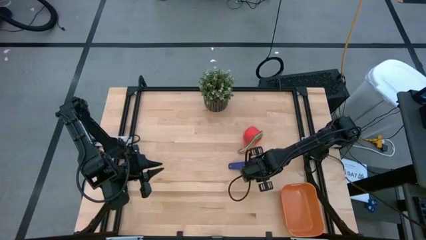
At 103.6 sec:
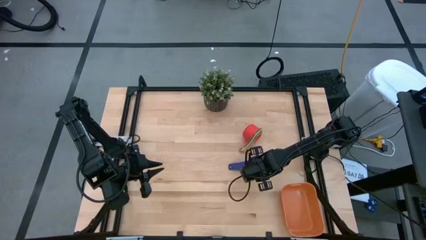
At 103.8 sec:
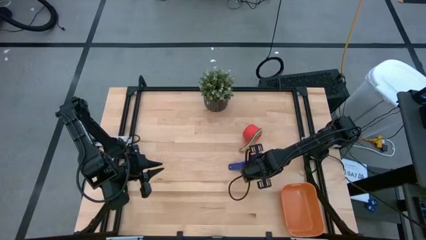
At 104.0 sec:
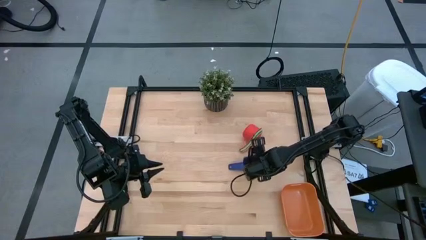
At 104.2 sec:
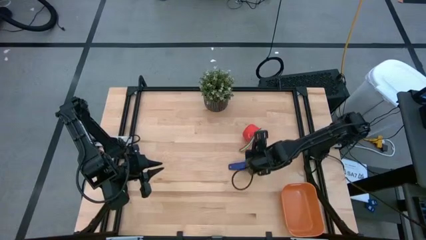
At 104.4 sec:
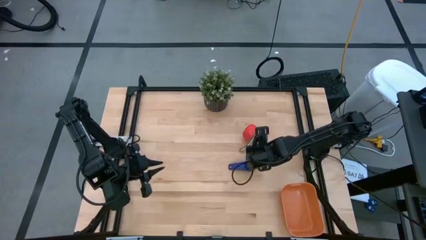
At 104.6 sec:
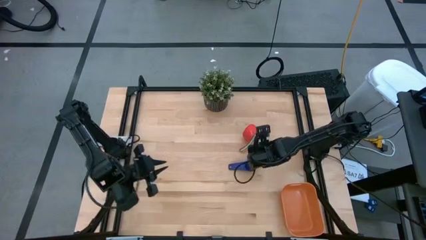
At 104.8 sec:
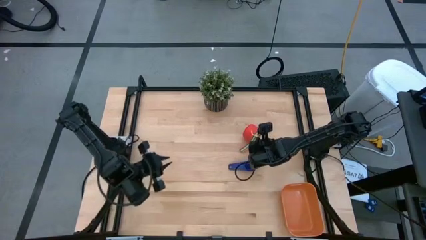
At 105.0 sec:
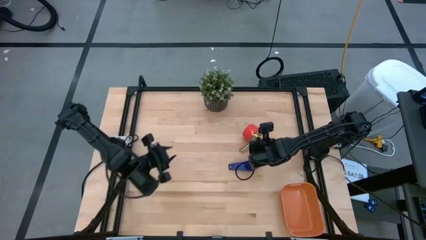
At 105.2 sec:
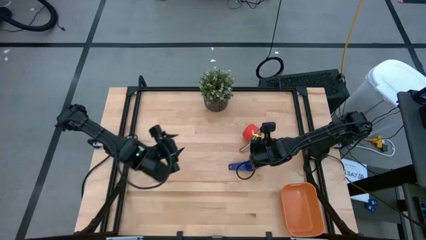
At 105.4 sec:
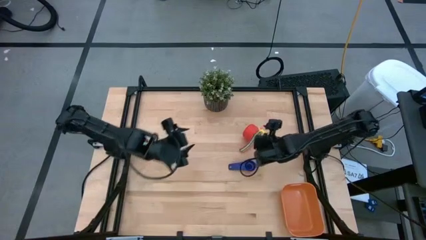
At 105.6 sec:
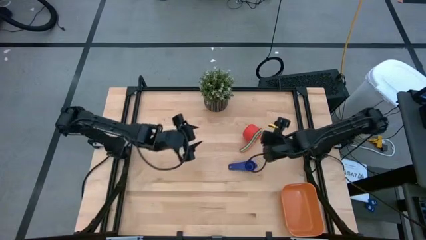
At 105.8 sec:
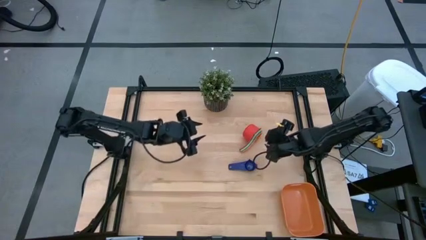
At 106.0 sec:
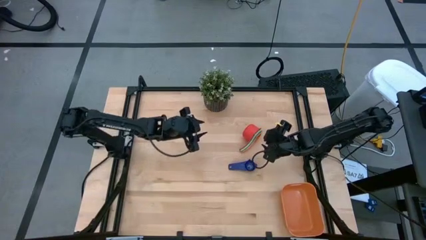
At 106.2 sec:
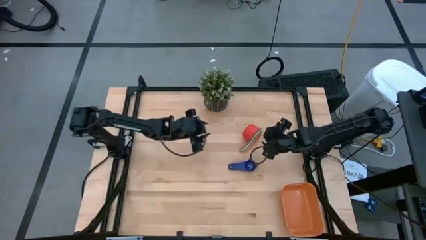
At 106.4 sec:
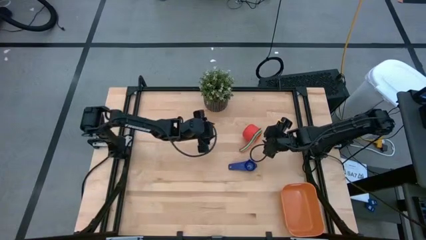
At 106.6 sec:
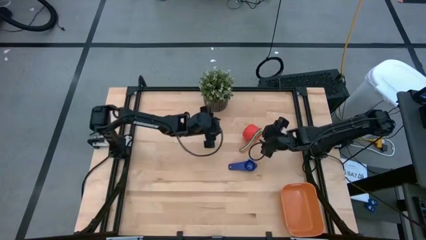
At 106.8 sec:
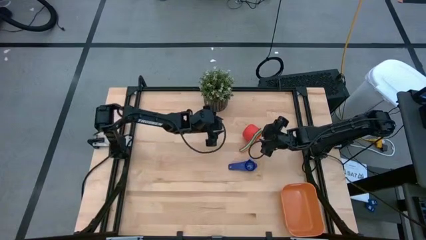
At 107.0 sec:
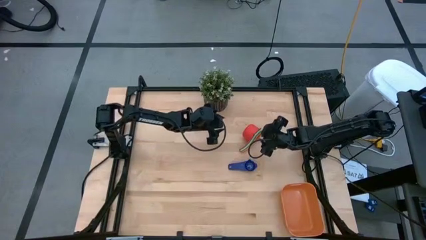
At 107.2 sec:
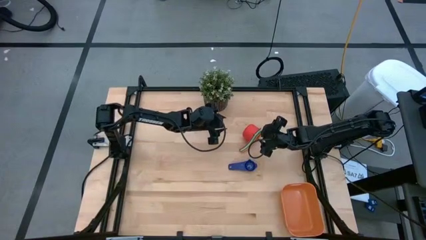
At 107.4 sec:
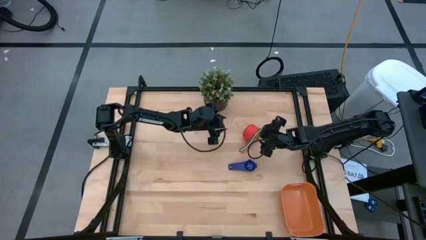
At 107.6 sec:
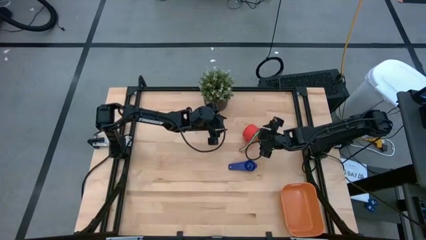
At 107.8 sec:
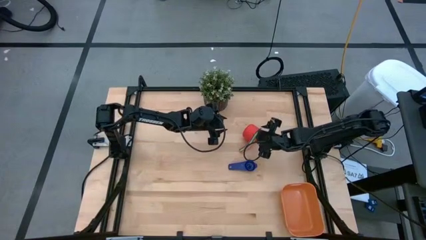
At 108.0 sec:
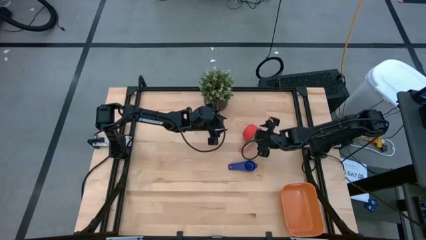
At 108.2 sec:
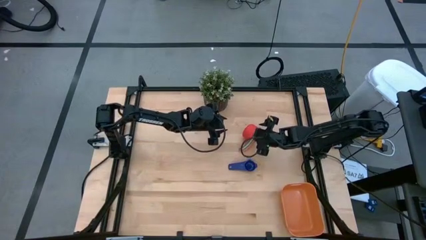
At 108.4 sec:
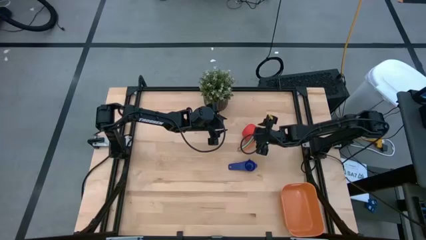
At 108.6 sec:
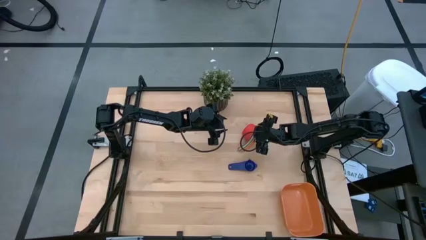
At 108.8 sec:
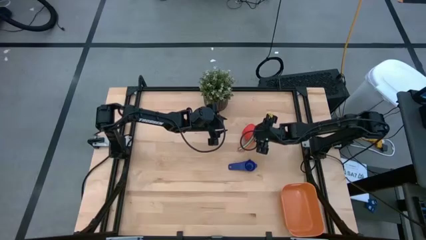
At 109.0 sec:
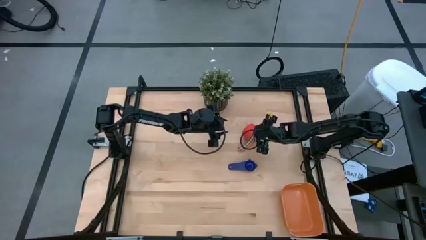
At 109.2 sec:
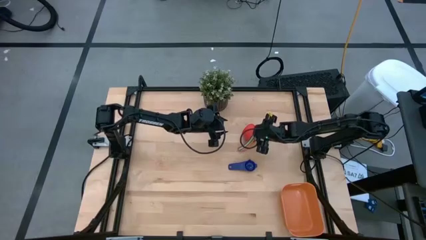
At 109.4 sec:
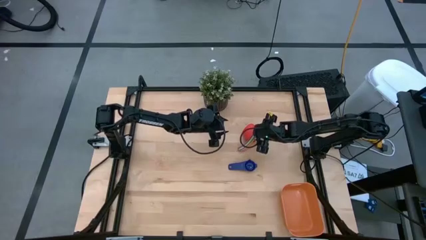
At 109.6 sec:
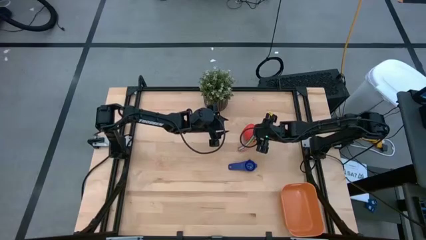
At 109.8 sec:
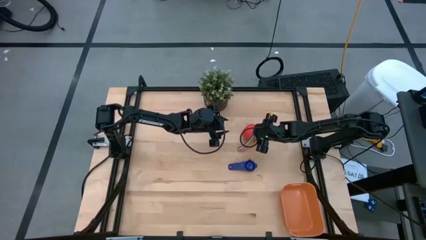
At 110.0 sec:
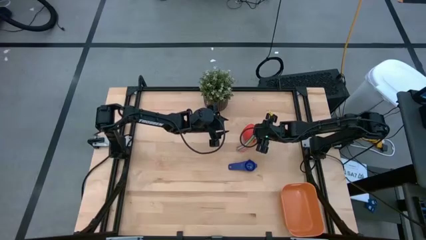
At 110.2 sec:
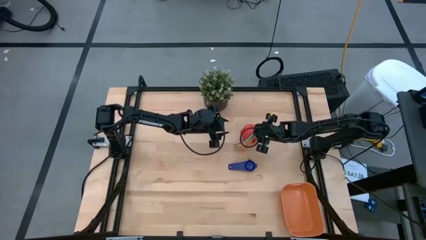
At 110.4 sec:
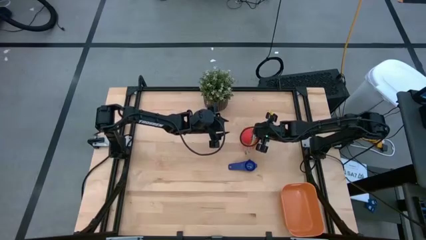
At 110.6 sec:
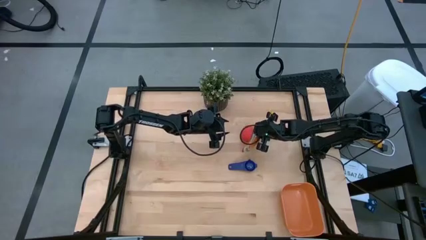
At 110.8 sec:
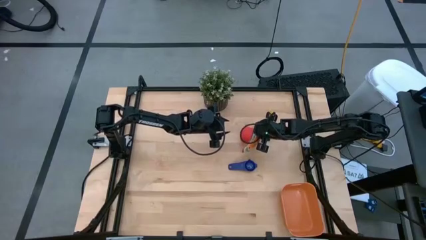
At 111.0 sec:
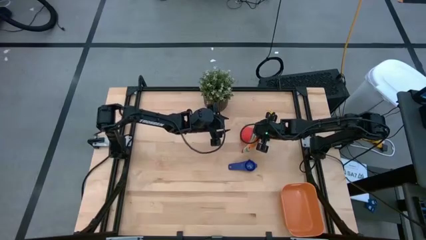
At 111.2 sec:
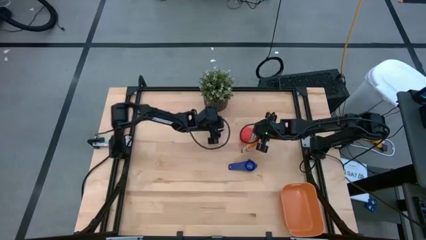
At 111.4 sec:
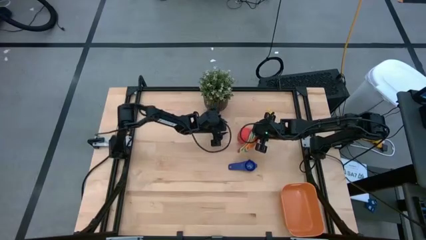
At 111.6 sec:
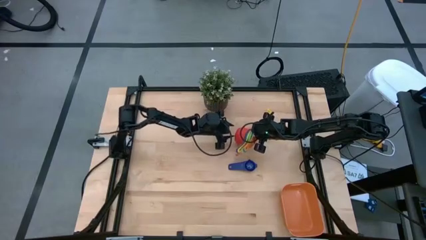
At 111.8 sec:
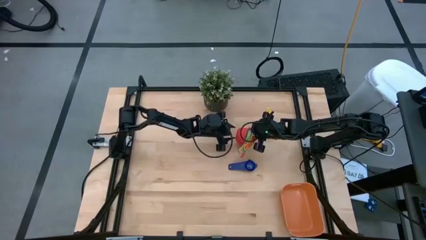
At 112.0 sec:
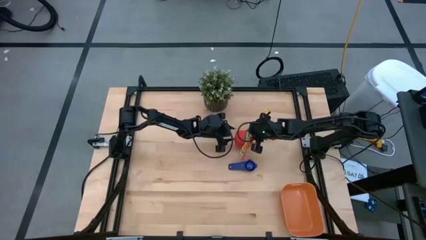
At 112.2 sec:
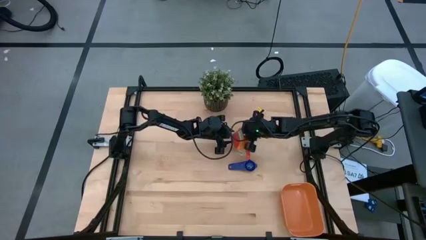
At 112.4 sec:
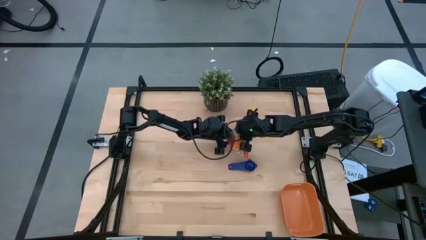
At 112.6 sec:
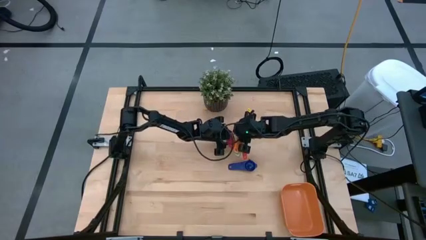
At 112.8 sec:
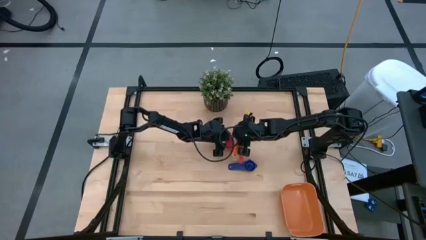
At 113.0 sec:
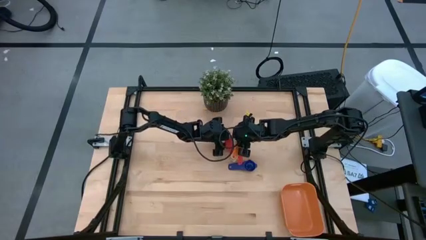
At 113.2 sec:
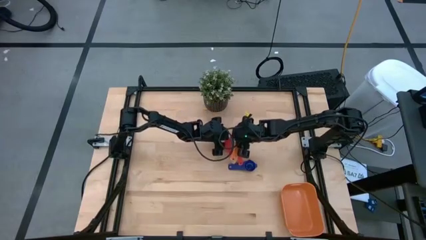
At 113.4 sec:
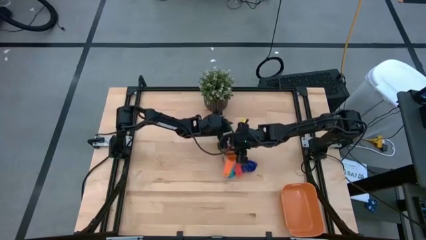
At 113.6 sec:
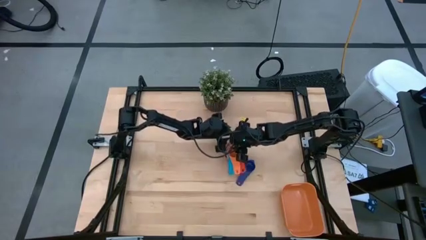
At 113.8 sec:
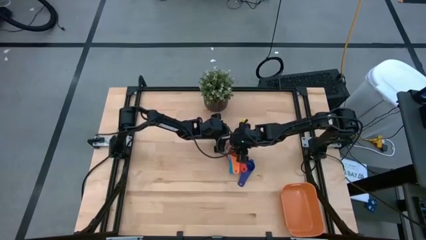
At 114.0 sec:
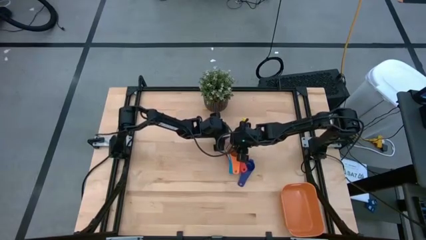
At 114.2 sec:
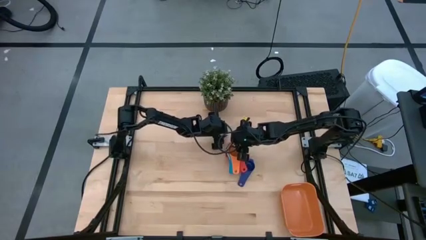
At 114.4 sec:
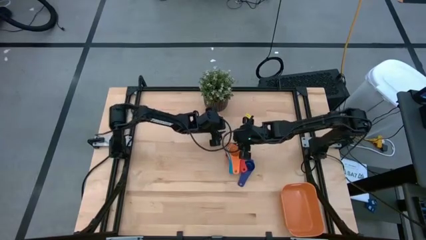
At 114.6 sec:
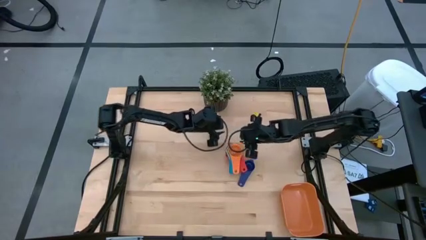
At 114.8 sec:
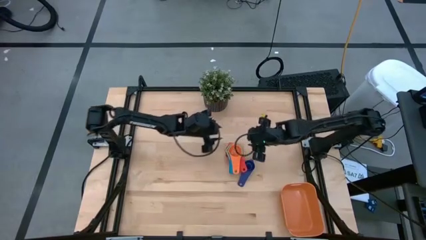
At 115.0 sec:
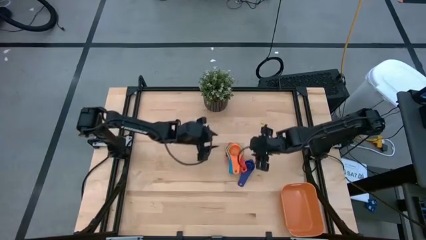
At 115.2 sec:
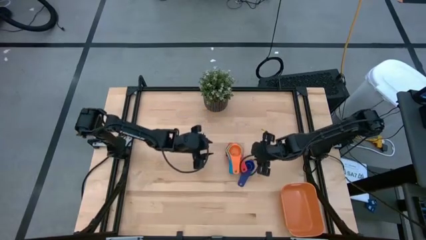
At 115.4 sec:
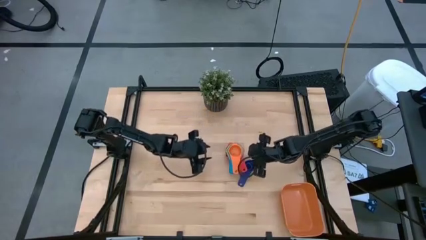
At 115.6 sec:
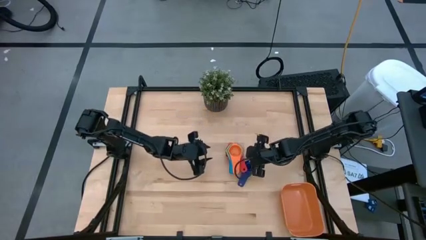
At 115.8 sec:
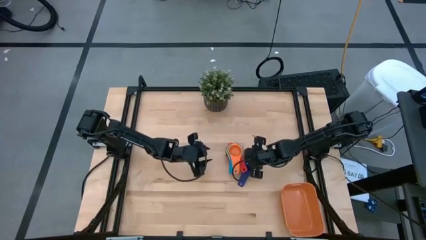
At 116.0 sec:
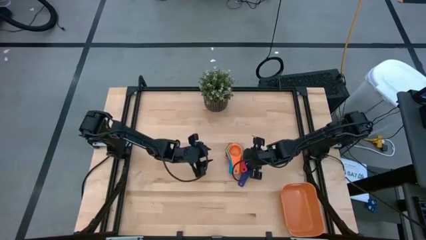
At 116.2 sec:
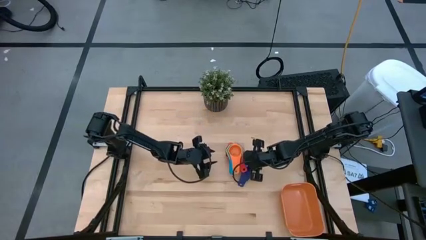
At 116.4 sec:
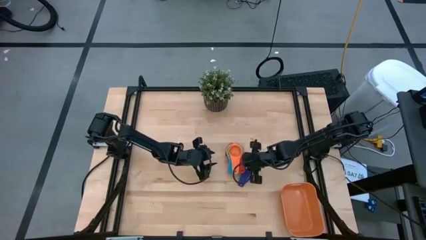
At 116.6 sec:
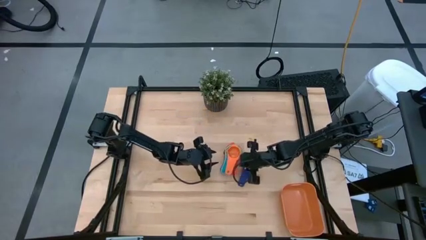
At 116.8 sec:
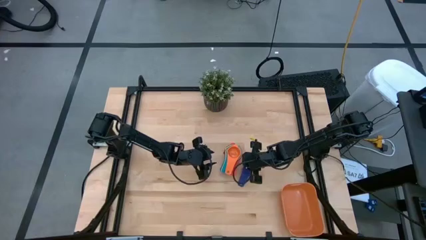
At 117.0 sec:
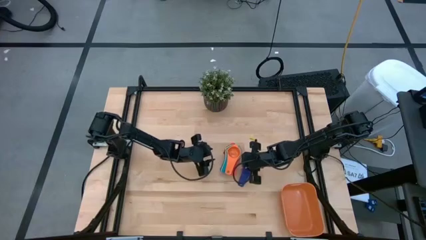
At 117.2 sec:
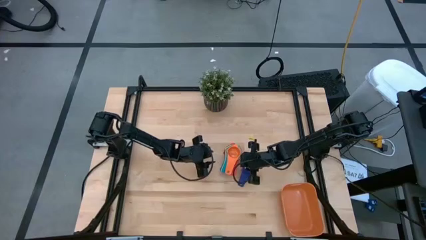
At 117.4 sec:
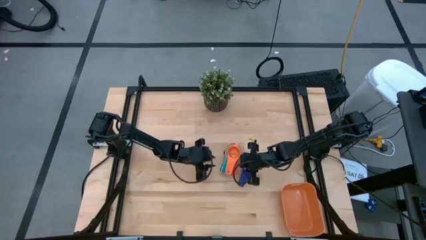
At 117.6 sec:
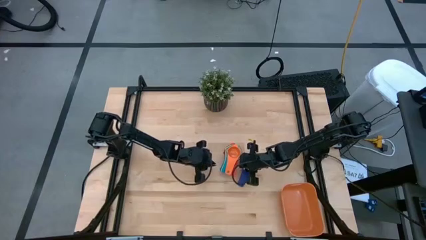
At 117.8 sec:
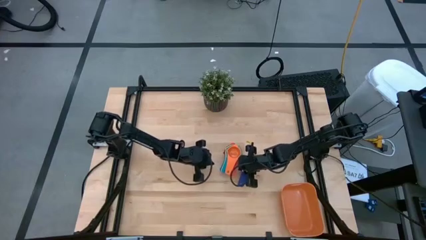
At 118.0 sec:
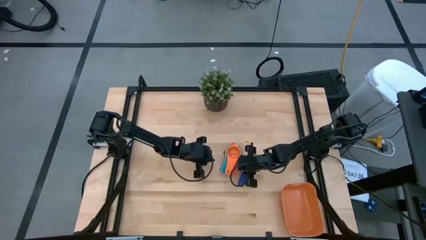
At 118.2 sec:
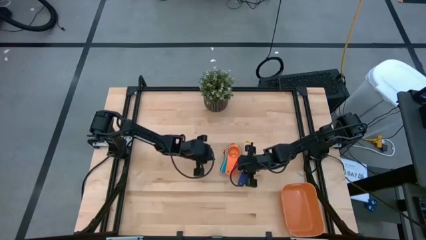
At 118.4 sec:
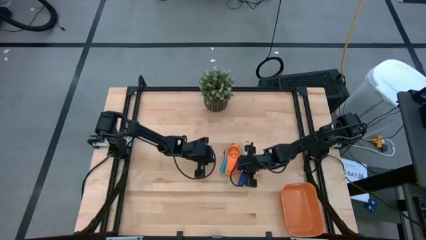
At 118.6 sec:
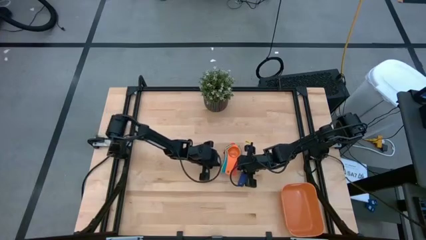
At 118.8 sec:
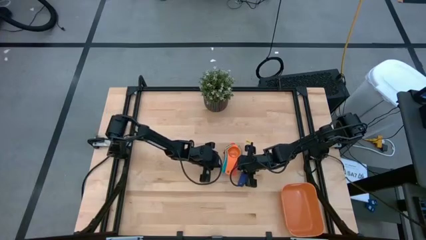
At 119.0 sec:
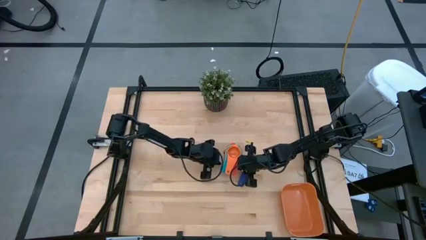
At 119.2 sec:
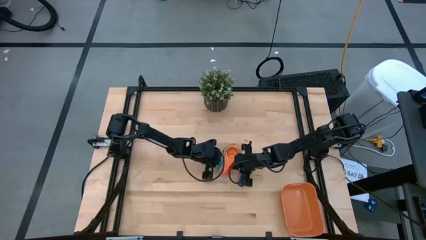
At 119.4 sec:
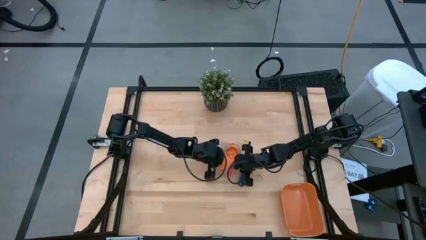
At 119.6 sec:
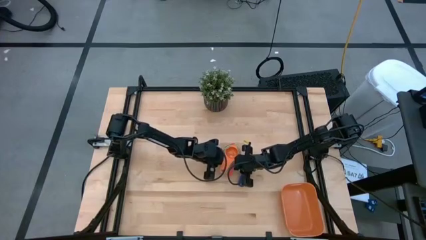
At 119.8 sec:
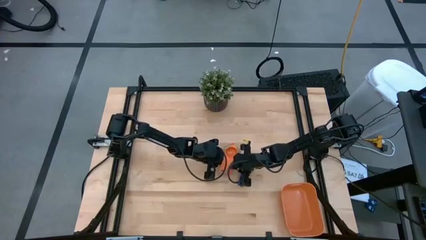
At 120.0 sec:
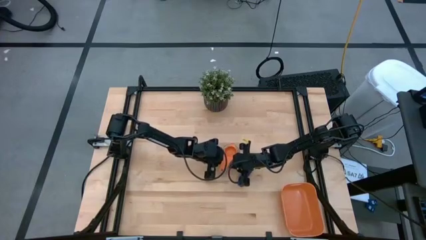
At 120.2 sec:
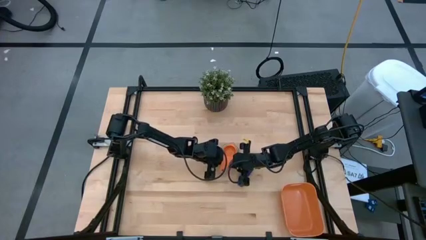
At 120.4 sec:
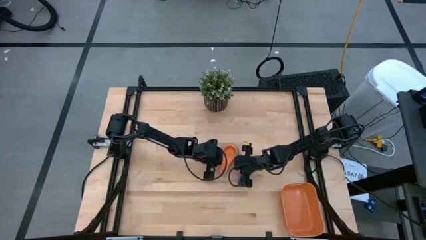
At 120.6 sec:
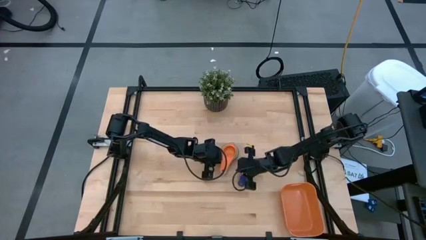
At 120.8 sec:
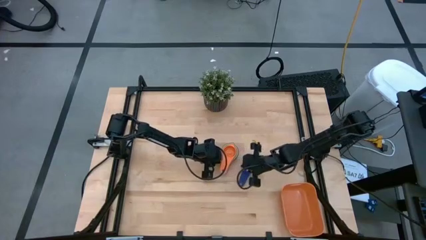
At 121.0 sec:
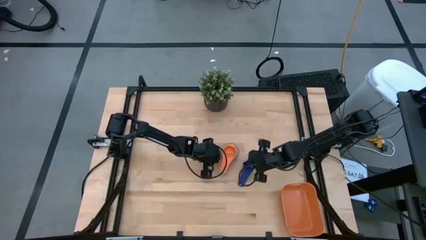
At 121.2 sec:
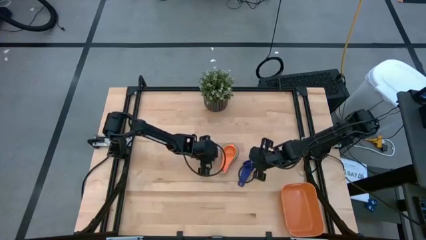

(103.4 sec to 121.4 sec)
Task: Nest measuring cups in basket
Put the nested measuring cups into the orange bin
